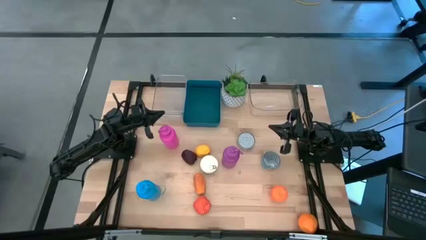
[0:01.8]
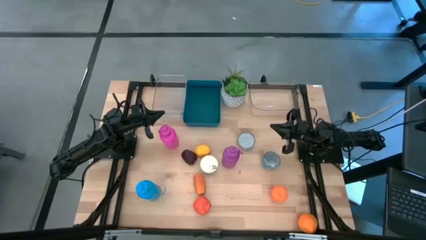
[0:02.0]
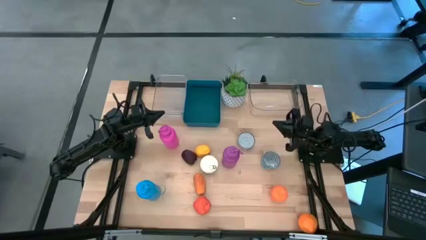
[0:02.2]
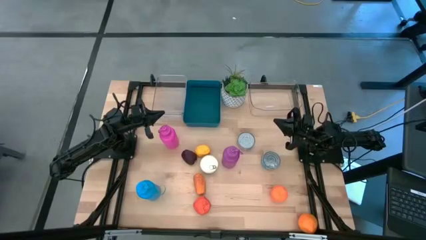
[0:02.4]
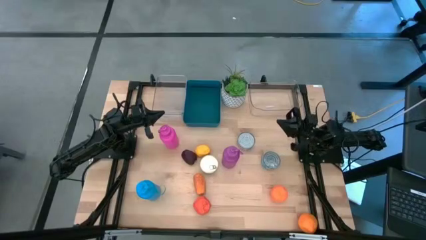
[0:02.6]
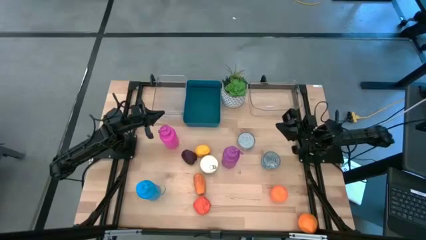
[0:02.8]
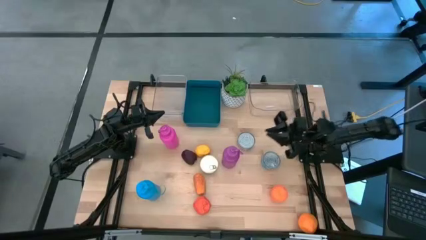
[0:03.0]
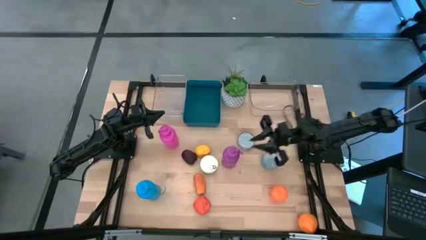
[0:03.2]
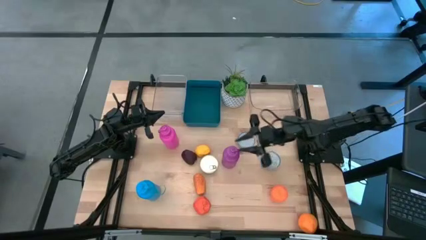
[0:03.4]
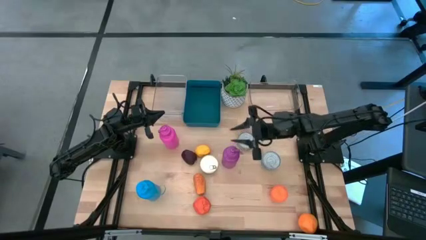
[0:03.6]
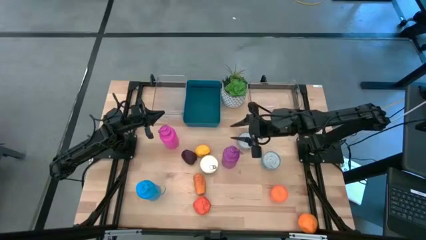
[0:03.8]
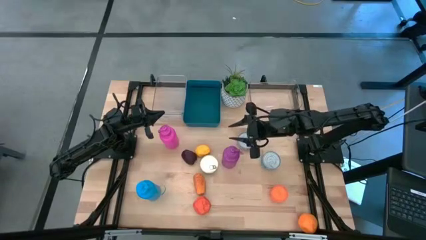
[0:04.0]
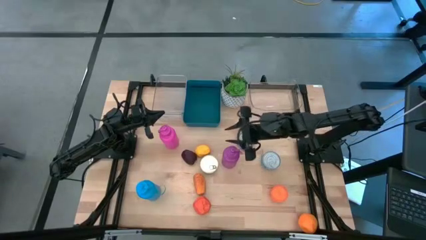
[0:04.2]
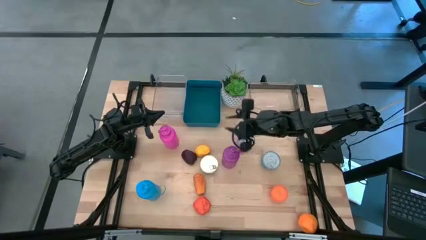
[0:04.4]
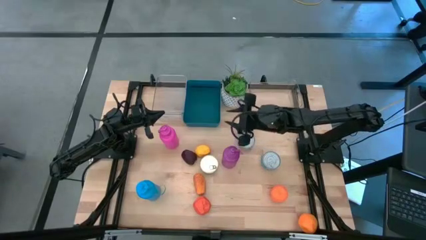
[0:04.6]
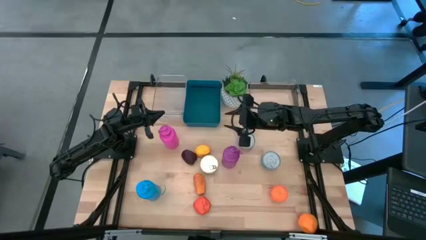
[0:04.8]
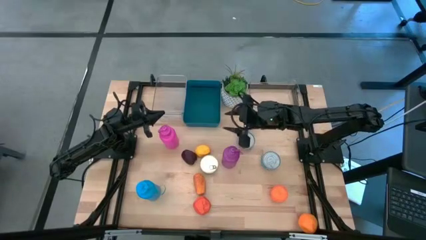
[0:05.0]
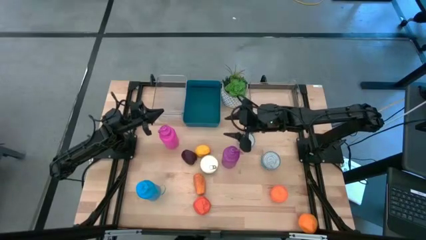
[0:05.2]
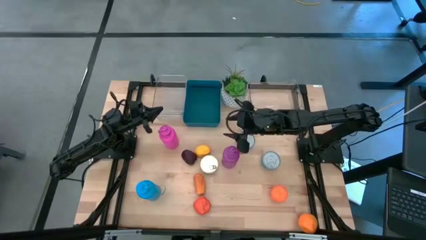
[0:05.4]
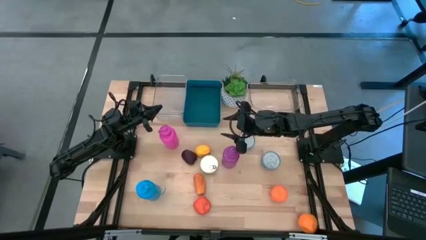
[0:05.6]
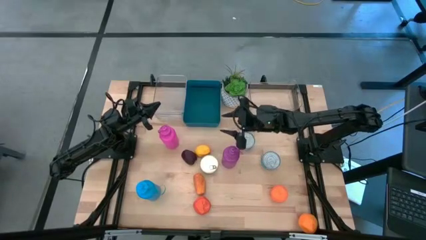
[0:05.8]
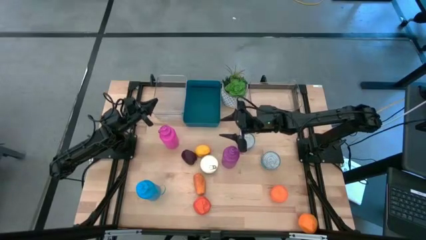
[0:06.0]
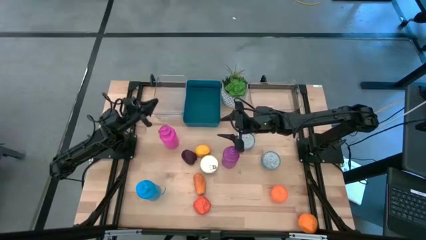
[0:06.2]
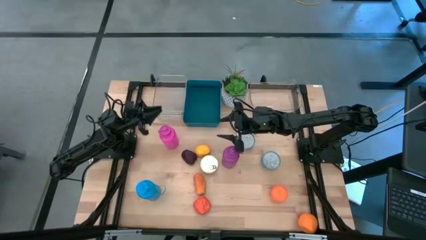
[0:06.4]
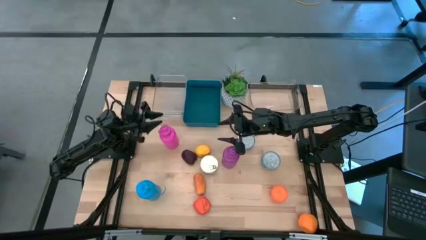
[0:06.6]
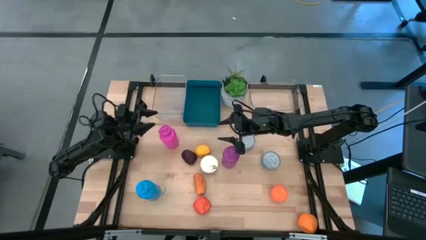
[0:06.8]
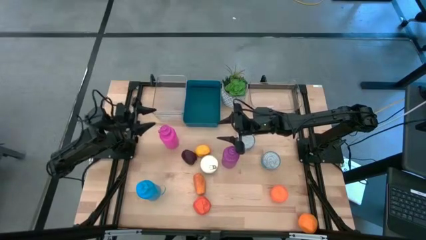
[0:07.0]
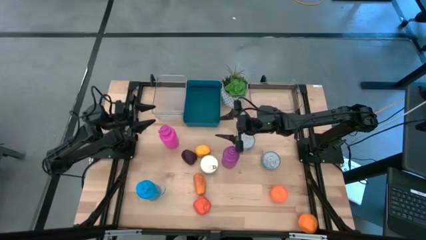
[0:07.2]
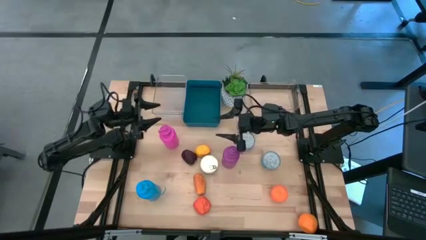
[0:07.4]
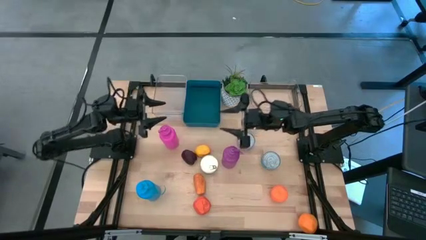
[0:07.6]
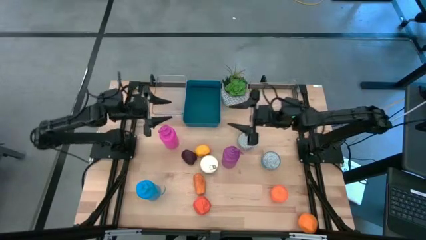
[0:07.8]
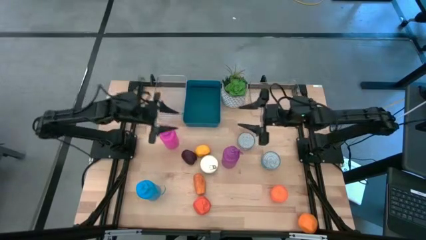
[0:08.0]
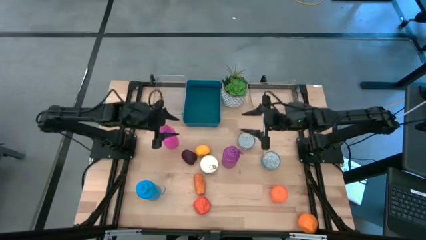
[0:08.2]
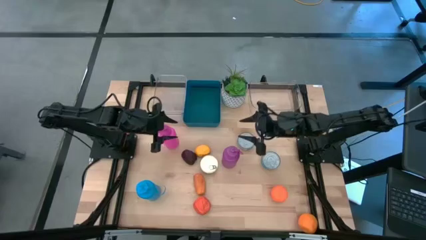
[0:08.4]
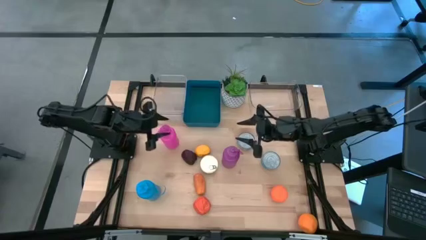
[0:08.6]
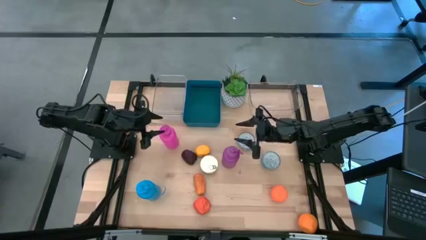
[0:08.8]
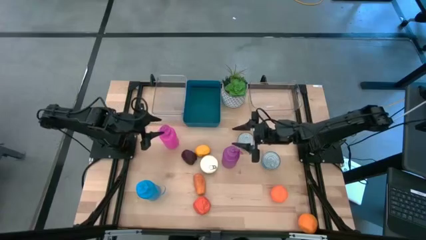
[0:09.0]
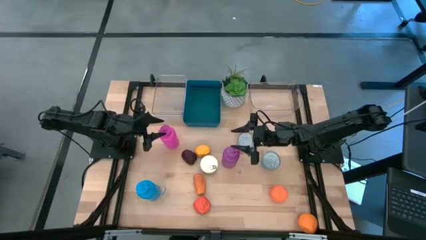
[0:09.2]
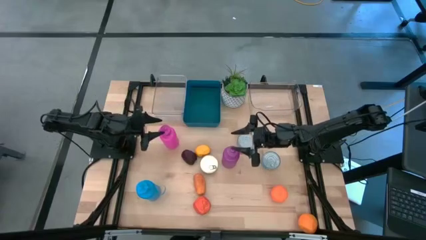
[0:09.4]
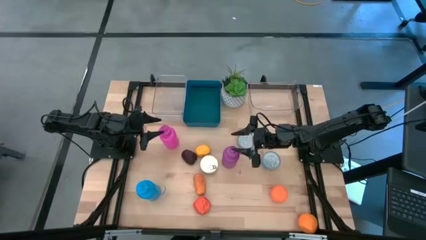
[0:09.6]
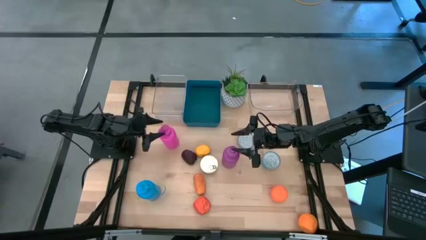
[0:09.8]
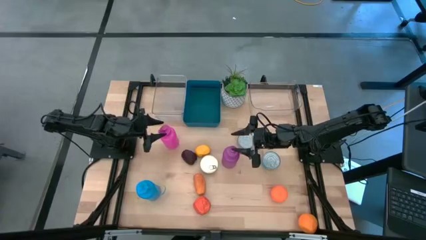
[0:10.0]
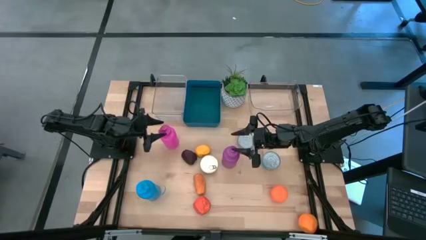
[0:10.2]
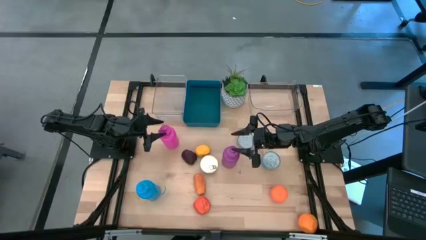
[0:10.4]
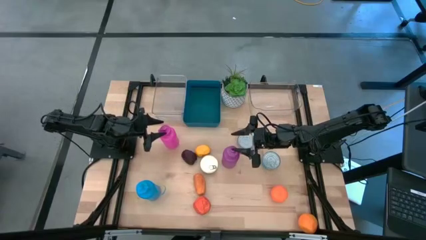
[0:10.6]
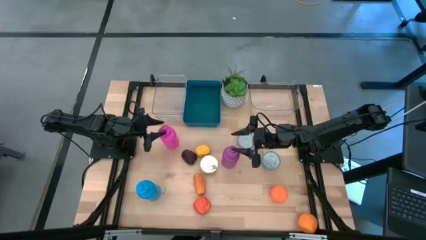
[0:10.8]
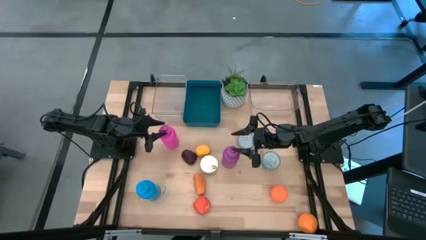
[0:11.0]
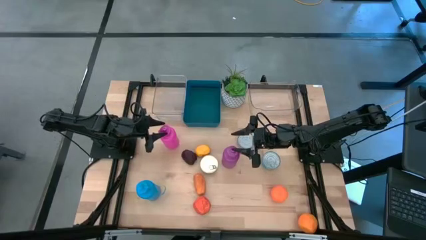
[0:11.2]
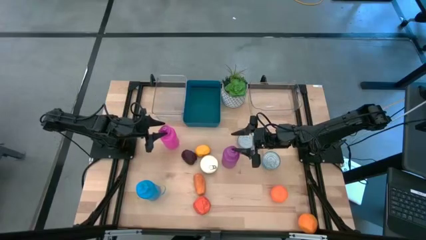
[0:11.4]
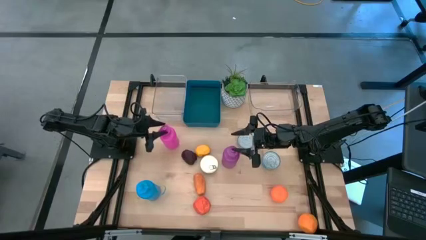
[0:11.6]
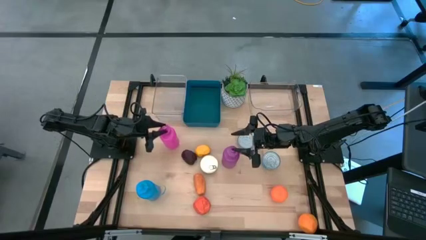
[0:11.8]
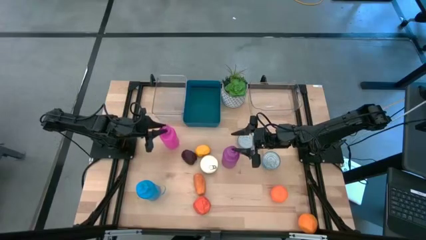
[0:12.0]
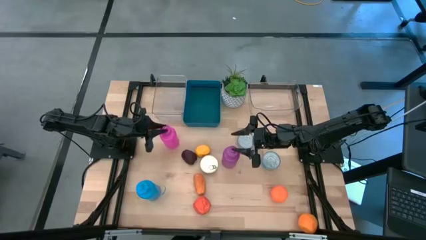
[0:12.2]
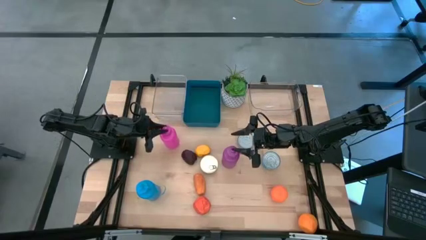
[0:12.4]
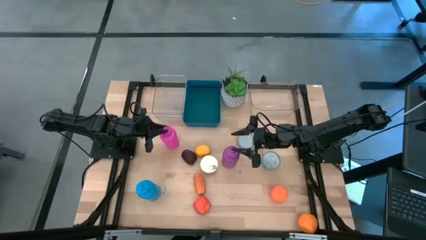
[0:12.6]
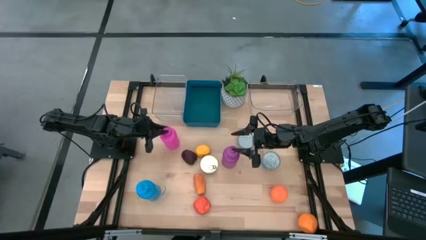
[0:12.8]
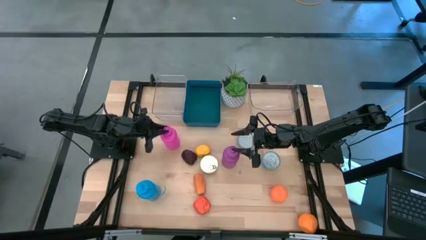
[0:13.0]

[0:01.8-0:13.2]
Task: Pick & Place Food Item
Put the pink bottle into the right transparent bin
